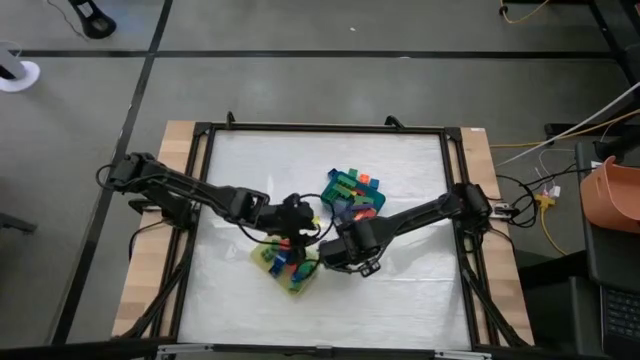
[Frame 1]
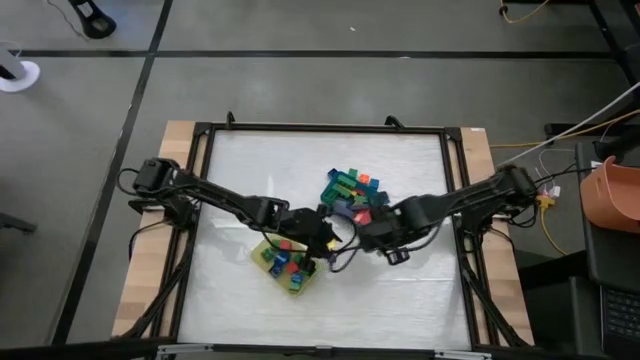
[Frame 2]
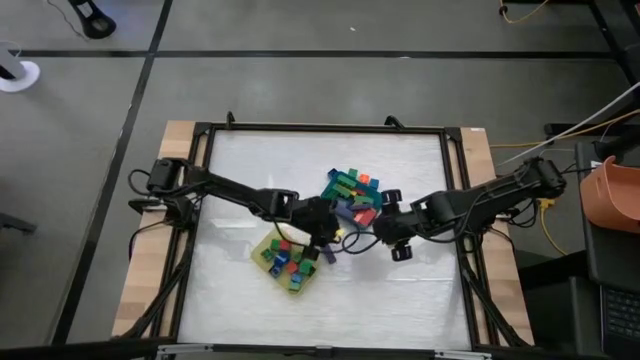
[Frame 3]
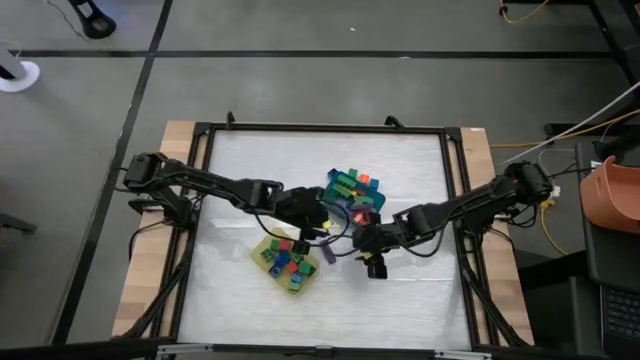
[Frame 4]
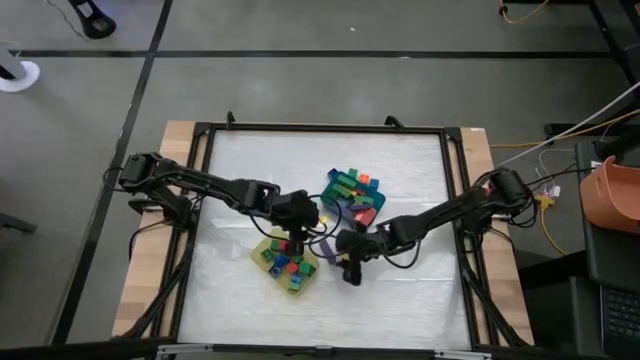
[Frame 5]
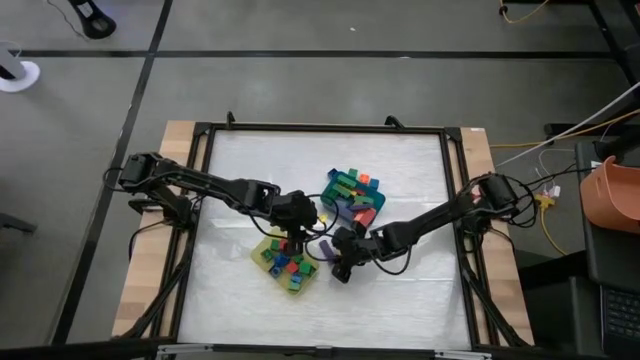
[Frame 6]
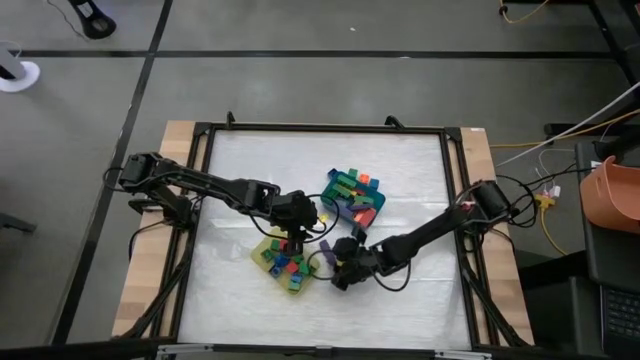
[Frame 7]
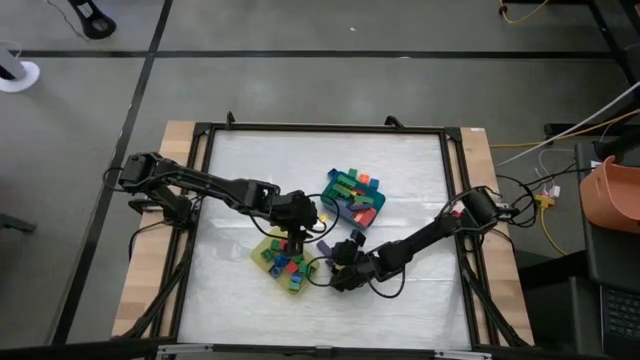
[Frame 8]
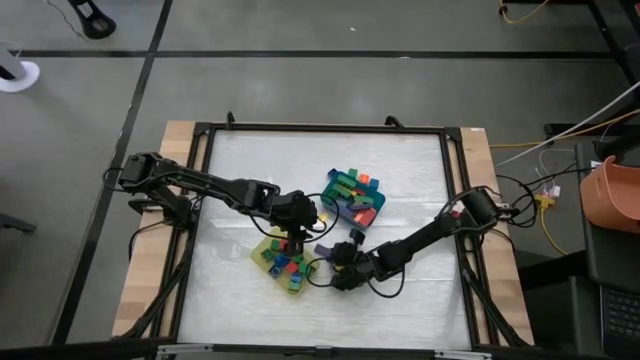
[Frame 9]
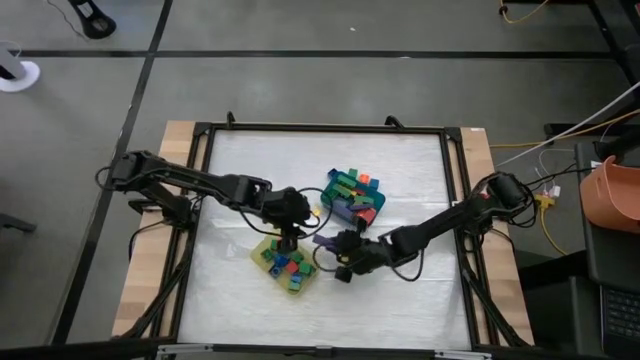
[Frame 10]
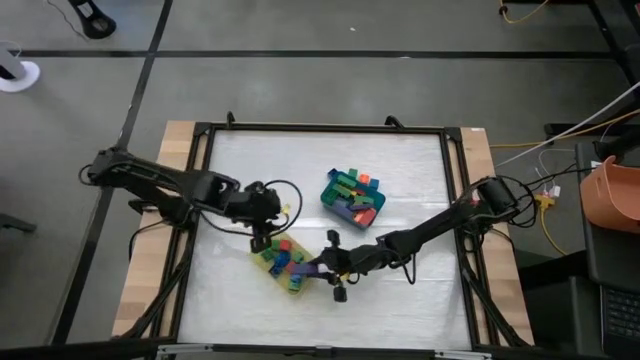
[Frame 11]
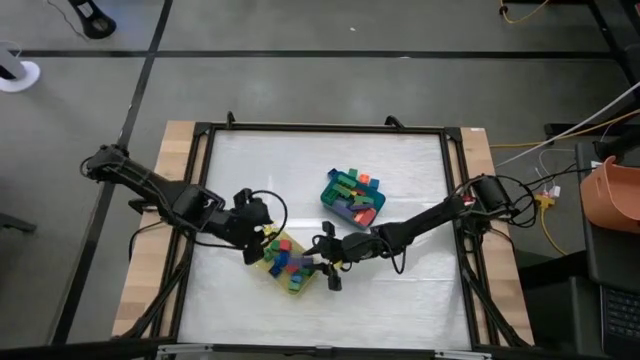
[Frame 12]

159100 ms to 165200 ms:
Task: Sort blocks by size
Put the large violet wooden block into the yellow bin

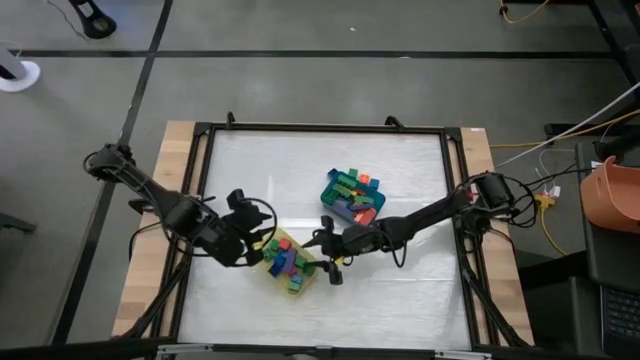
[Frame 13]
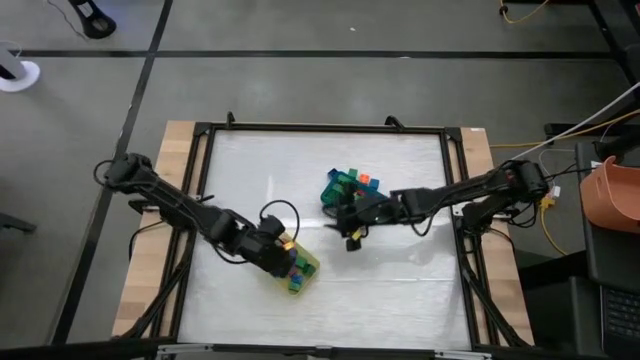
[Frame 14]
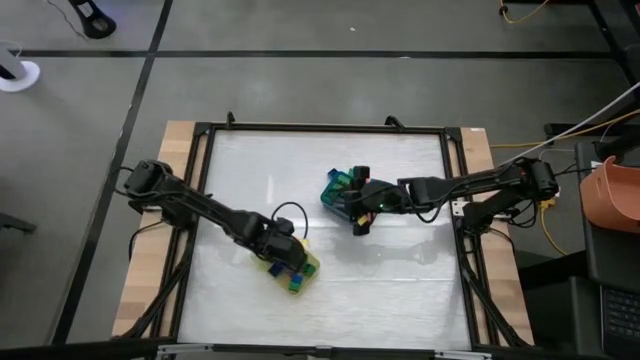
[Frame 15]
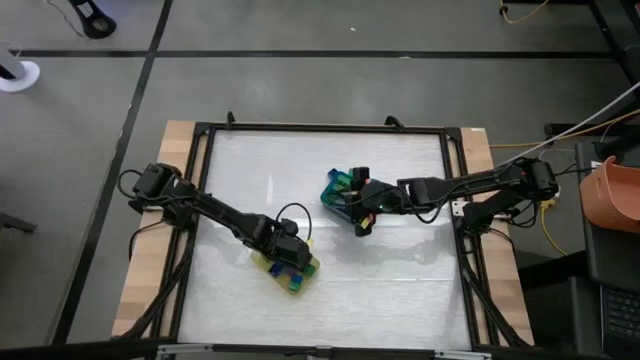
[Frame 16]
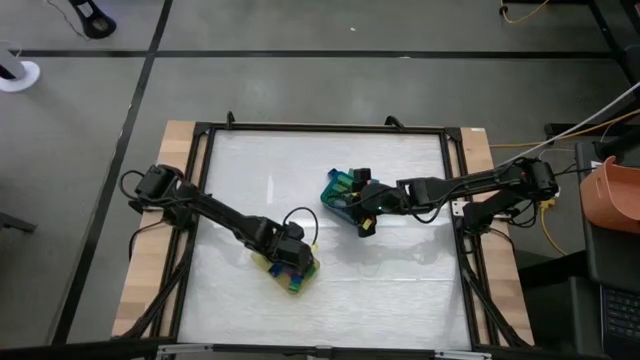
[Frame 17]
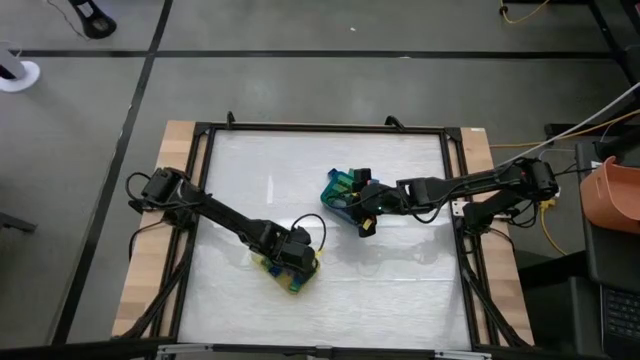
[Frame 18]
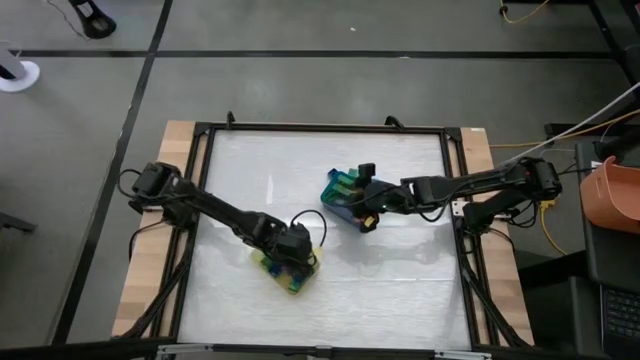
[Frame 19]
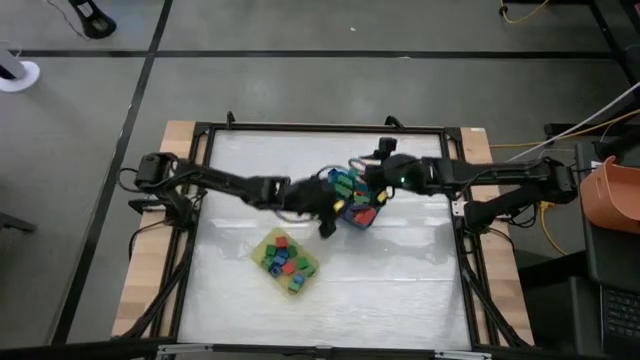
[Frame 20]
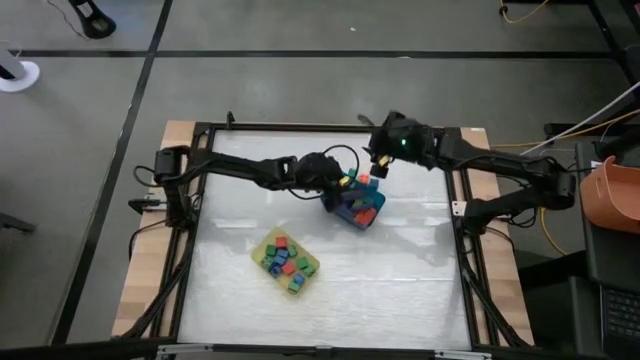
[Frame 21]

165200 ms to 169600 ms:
Put the large violet wooden block into the blue bin

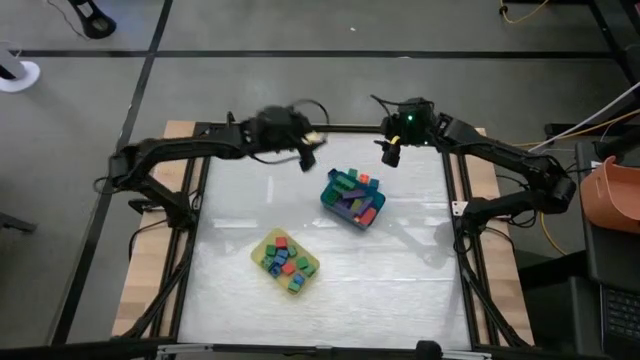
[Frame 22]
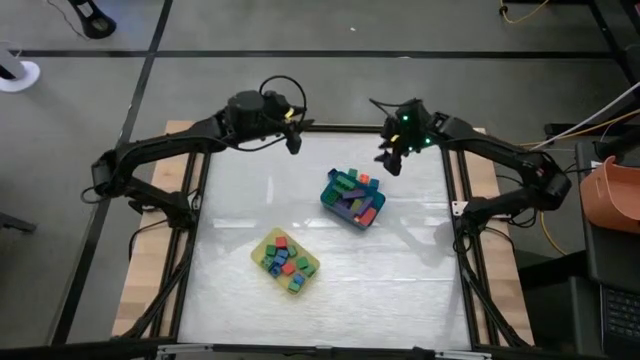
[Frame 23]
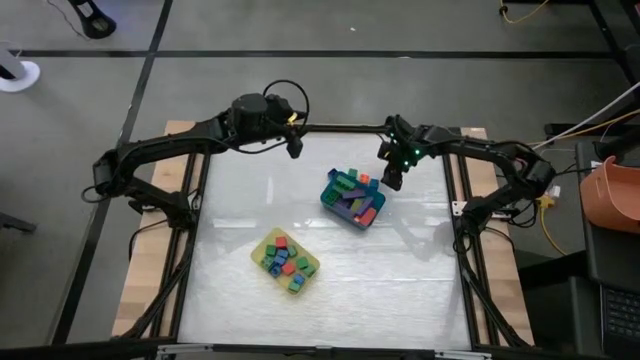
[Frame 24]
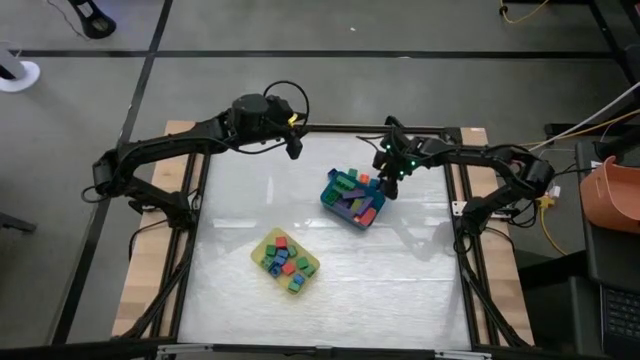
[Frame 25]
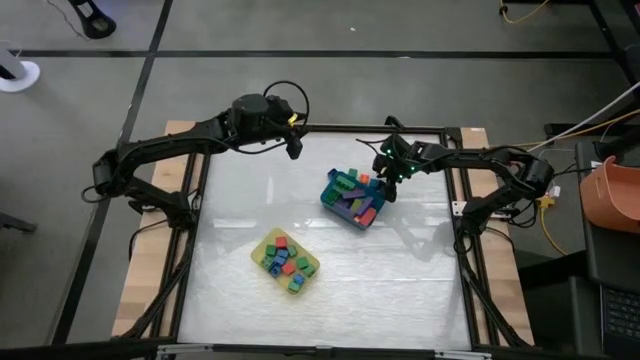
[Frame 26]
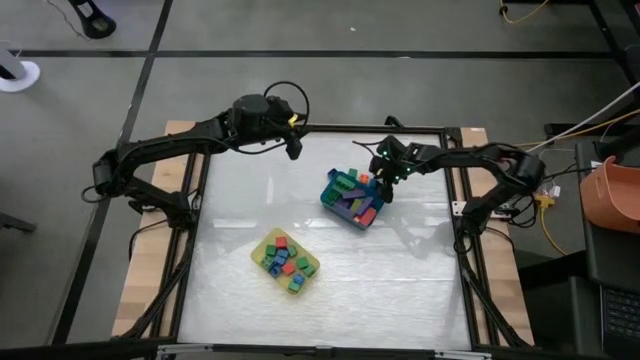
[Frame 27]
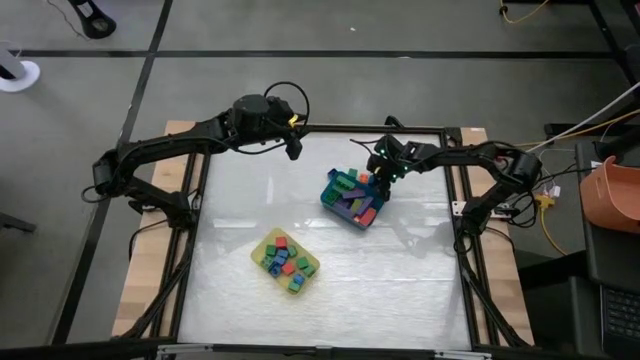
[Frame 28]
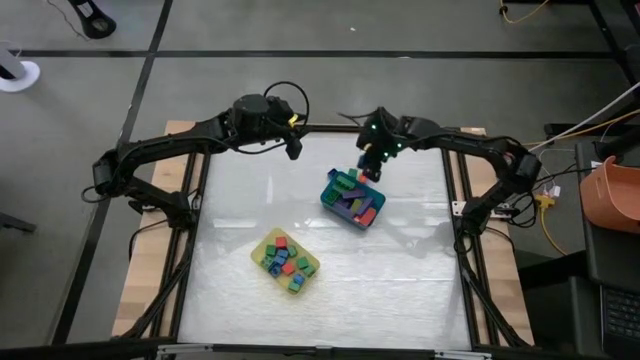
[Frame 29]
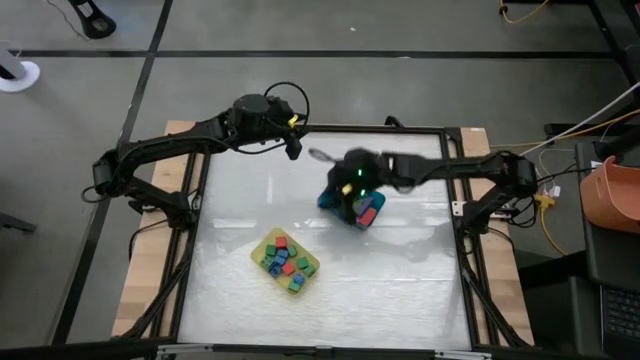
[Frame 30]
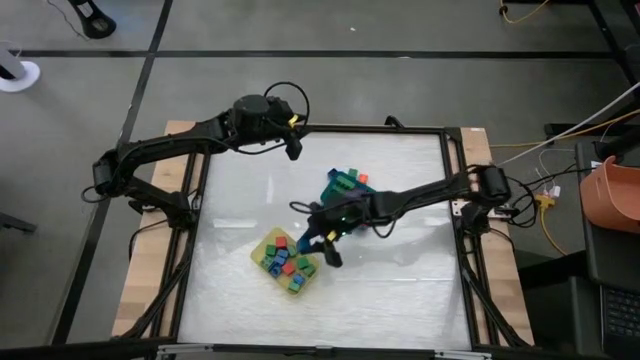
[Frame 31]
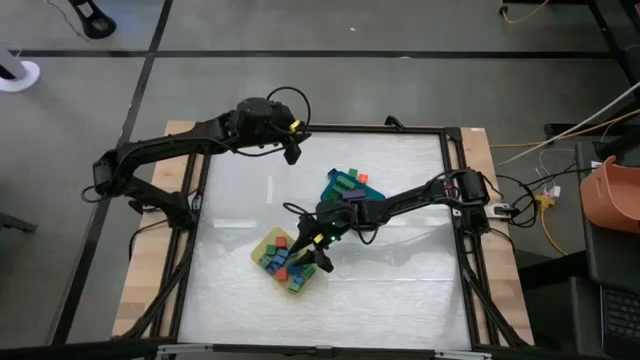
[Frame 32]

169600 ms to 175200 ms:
Put the small blue wooden block into the yellow bin

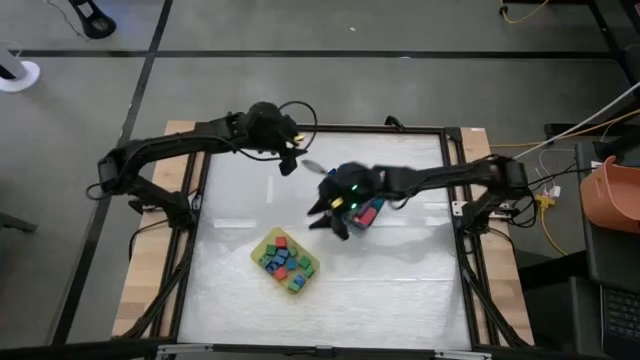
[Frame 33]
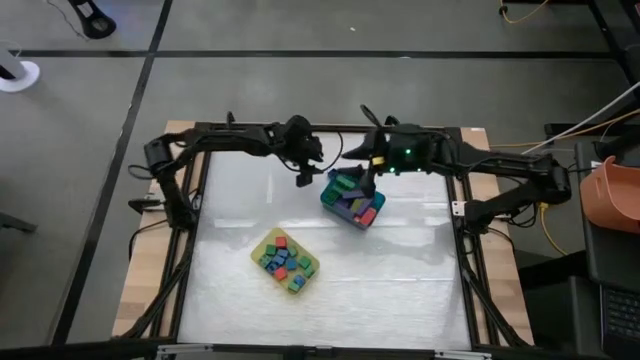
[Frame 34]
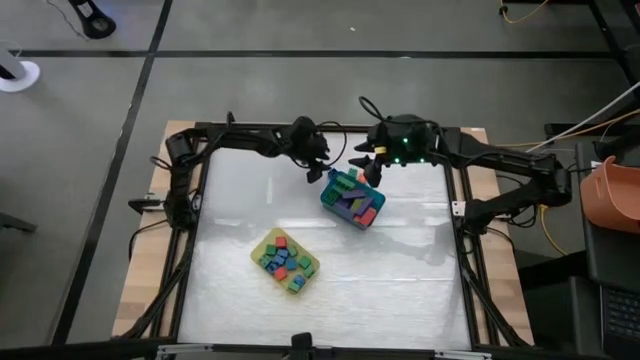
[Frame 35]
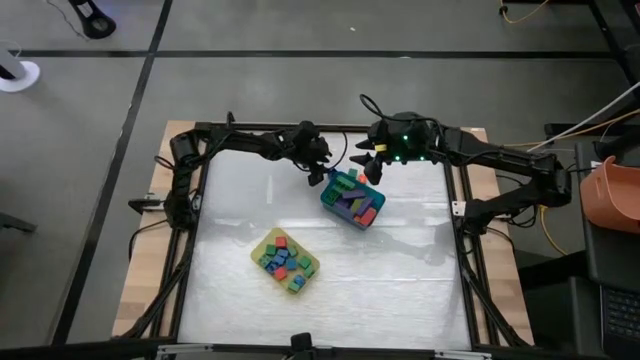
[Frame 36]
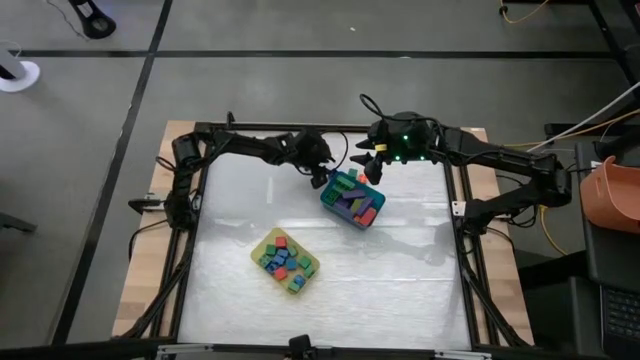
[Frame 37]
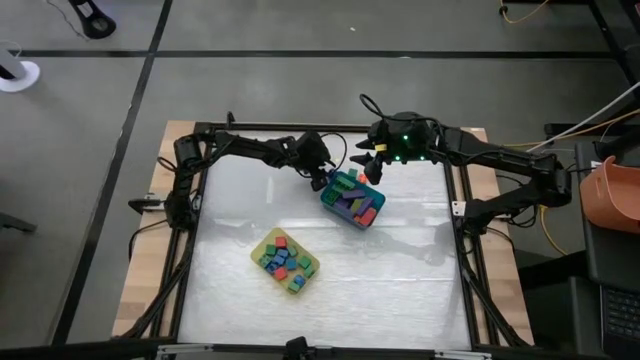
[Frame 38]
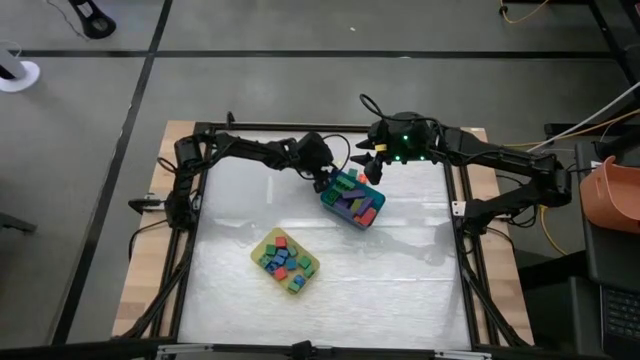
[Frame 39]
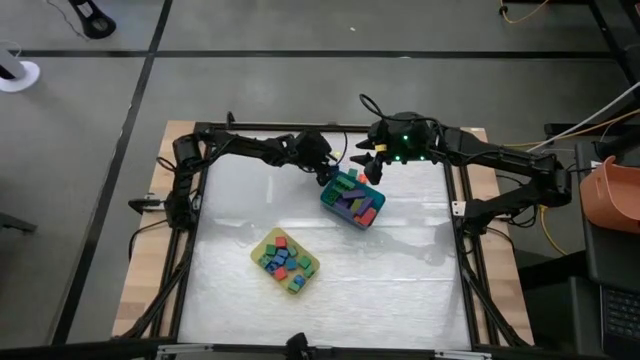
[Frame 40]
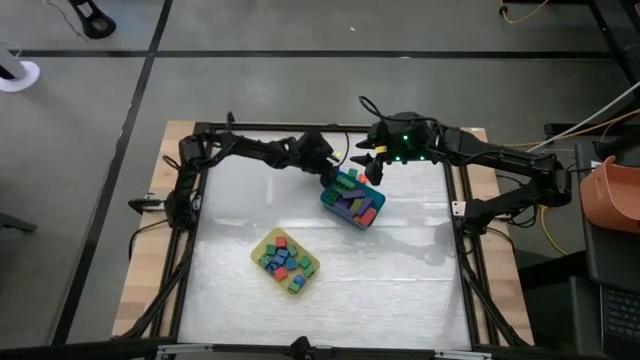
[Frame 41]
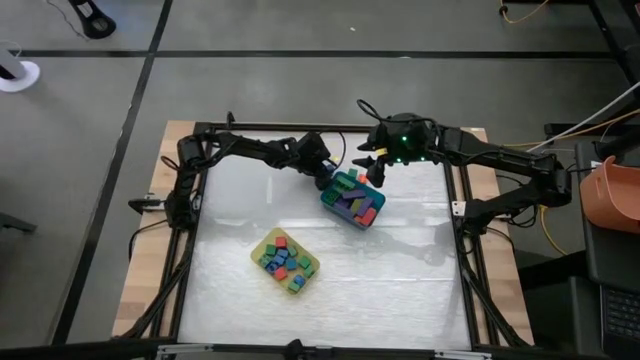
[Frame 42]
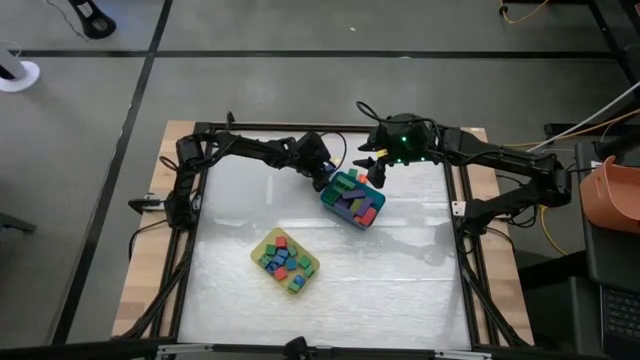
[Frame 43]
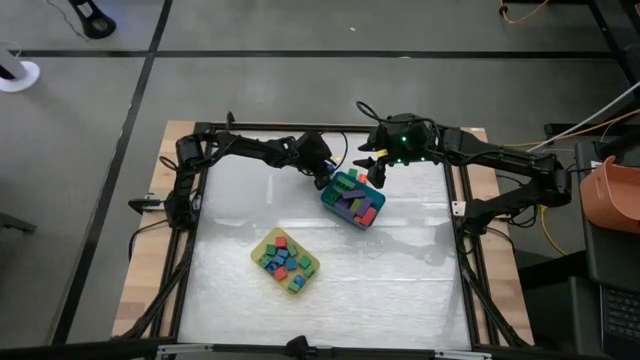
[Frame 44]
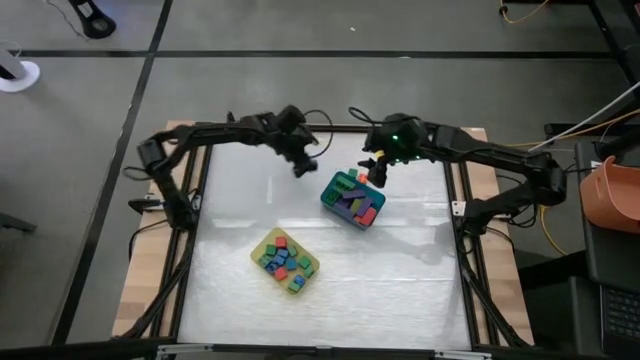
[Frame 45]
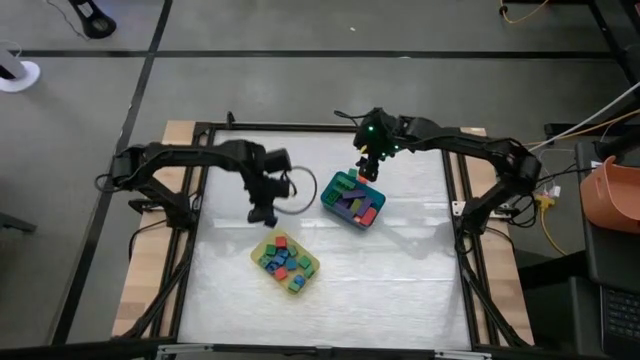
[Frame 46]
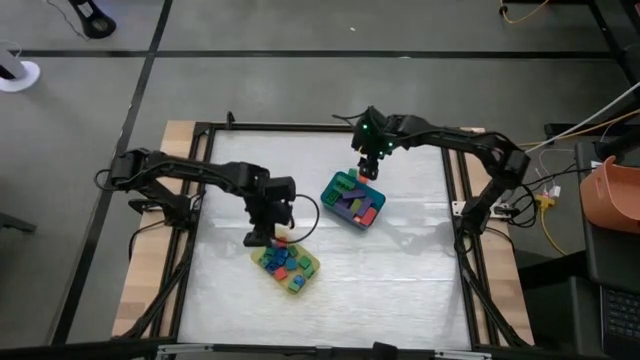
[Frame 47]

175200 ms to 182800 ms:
Put the small blue game piece into the yellow bin
